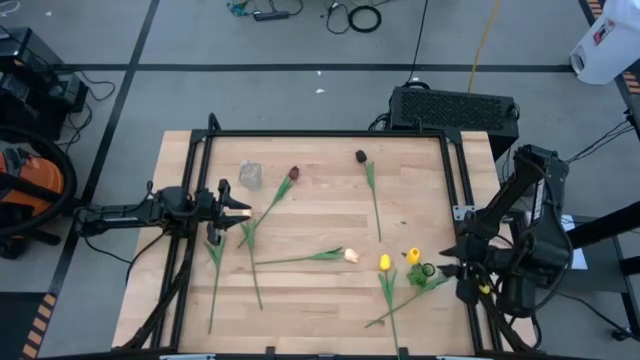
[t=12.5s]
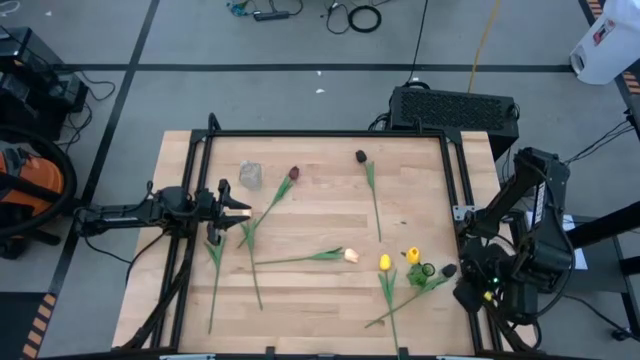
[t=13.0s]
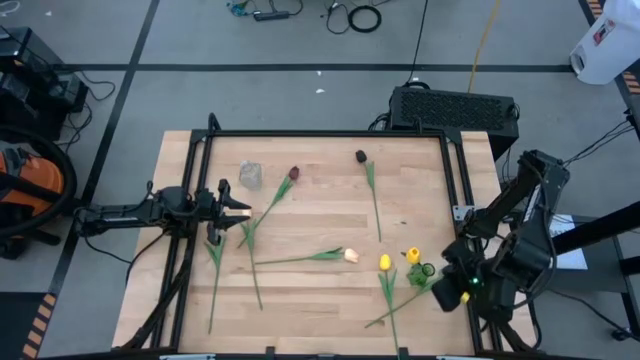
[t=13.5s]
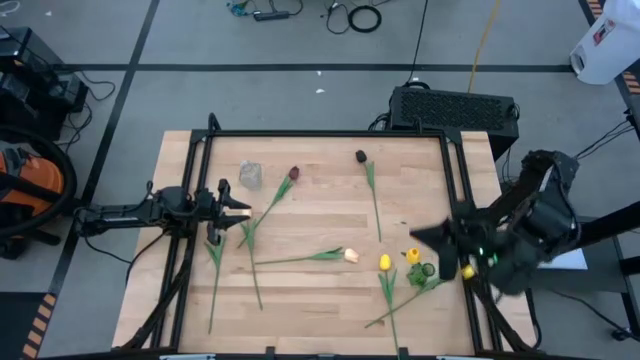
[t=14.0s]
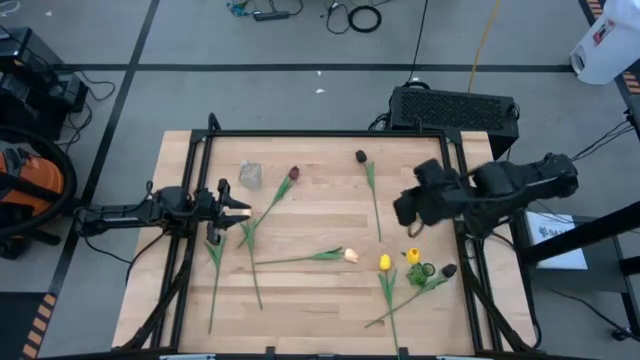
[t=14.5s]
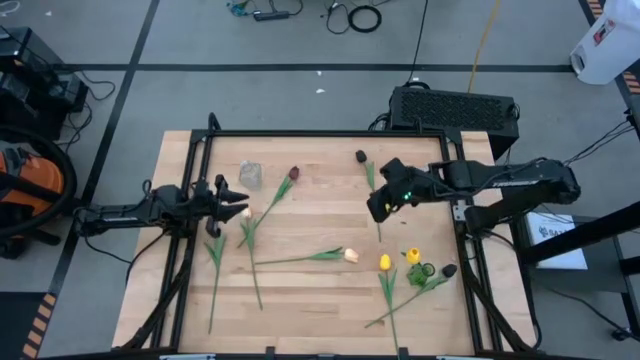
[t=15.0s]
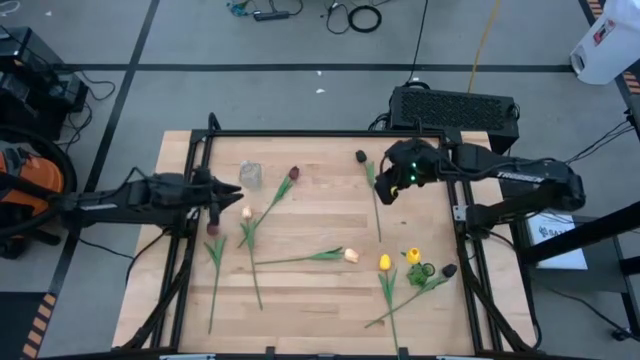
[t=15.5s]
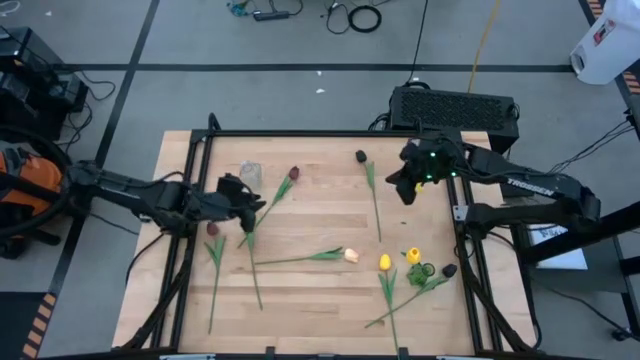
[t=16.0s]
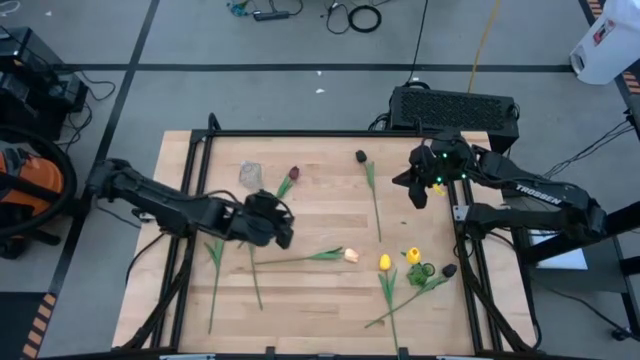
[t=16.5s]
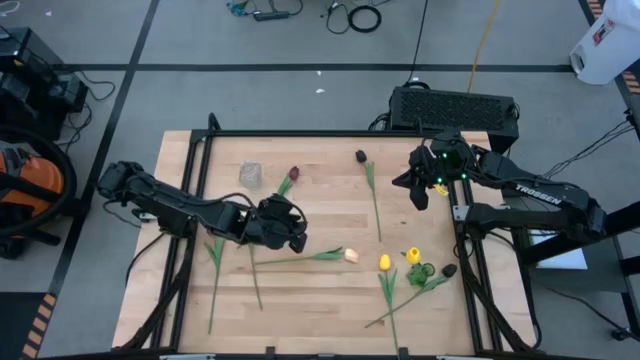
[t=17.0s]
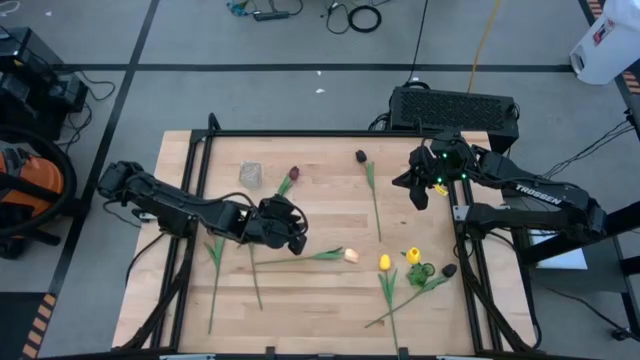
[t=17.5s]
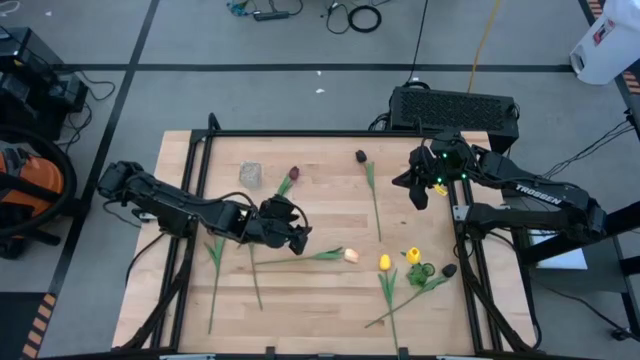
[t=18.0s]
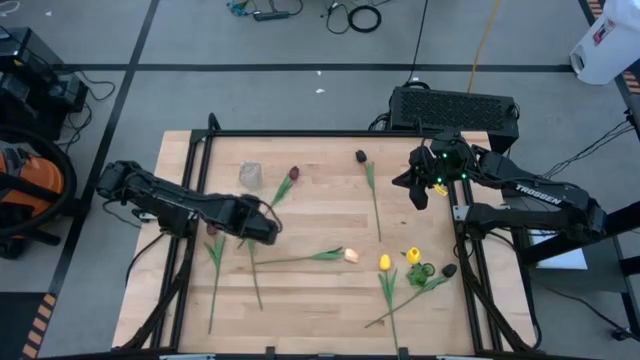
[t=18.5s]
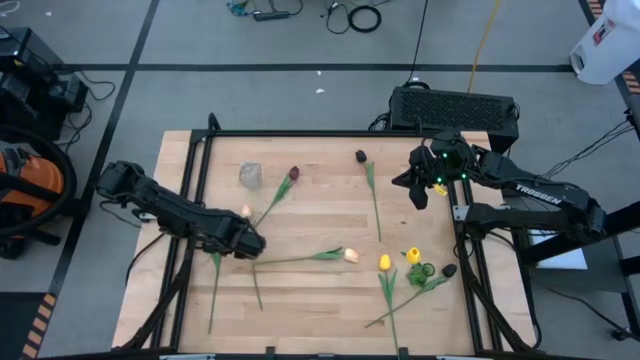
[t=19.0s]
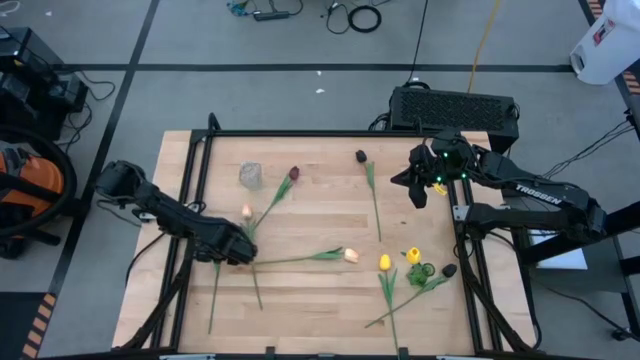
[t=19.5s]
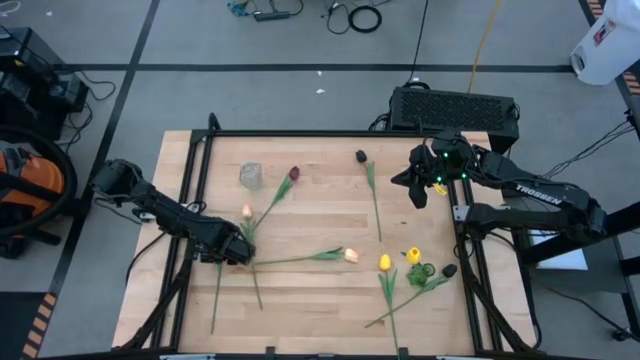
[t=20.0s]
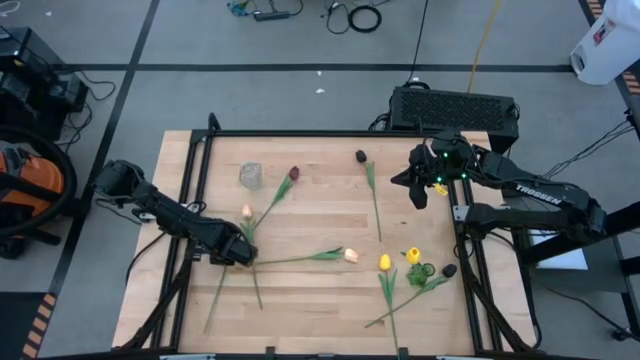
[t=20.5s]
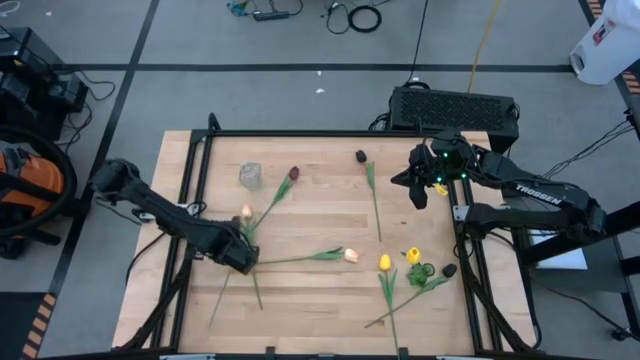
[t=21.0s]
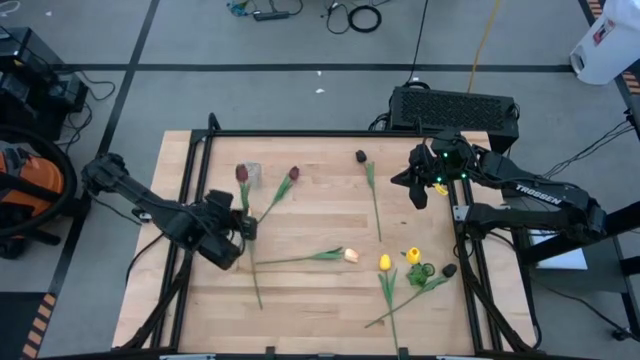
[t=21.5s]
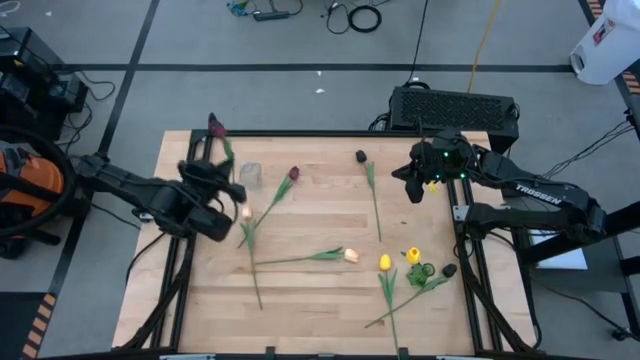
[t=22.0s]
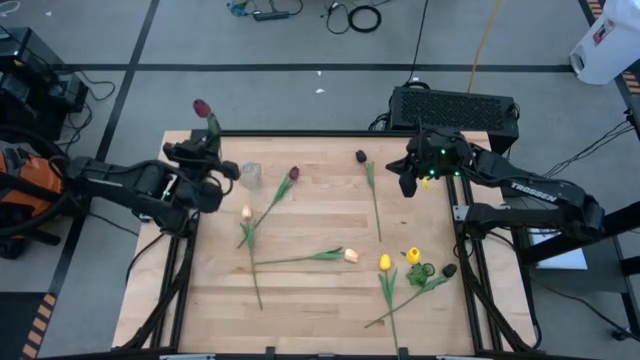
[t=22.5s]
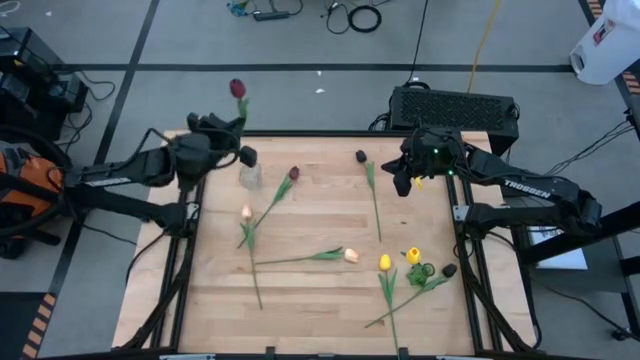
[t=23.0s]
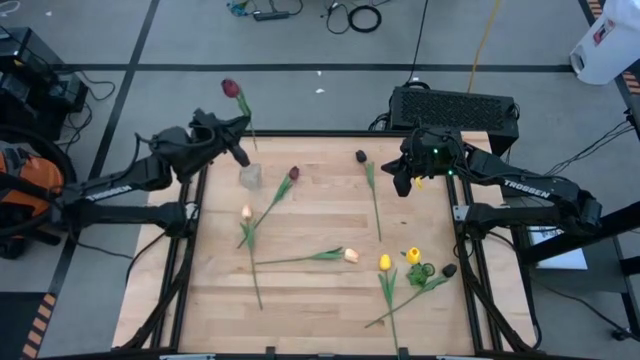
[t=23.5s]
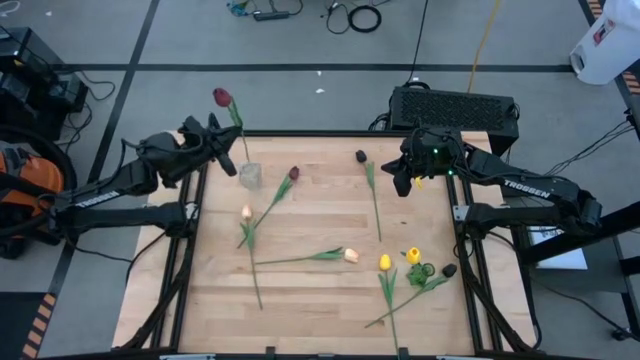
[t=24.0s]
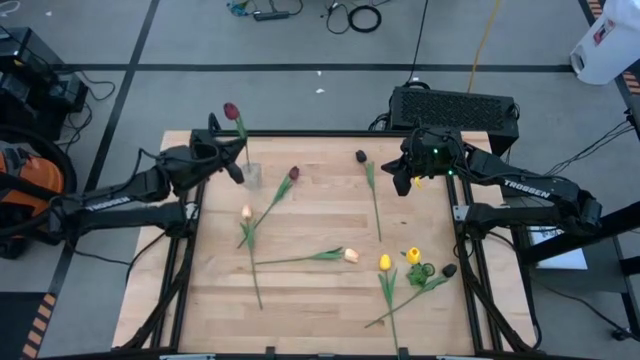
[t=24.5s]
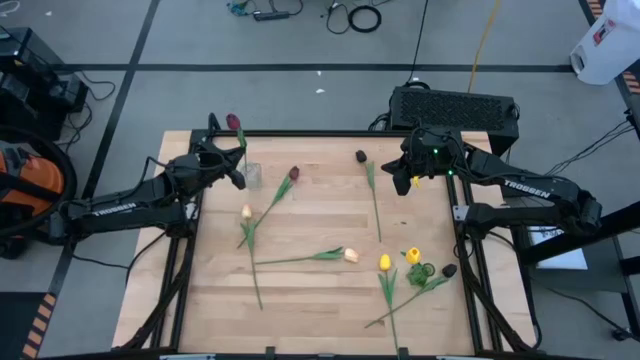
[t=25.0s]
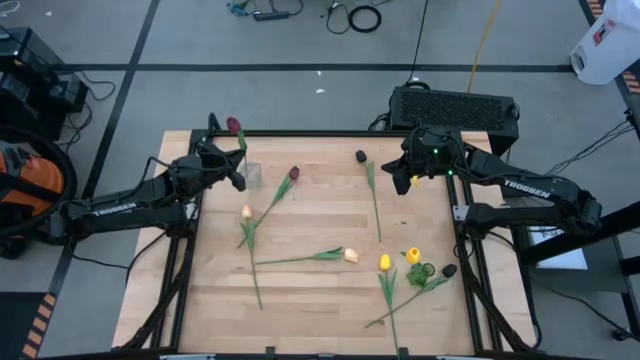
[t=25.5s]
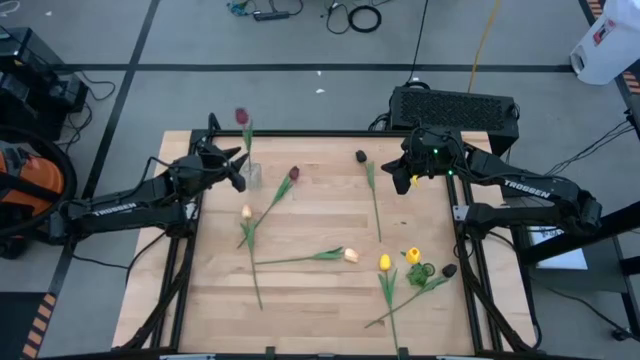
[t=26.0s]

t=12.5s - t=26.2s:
Task: Sort flowers into vase by color
Put the left red flower into the transparent vase

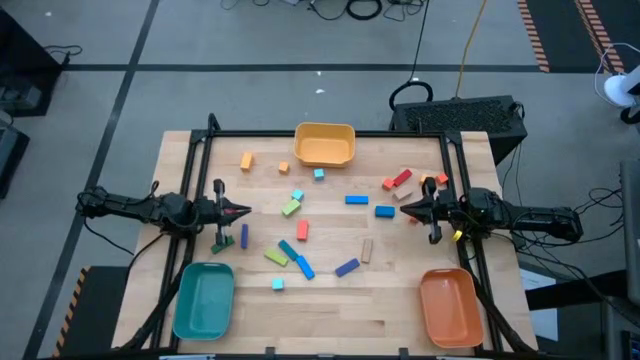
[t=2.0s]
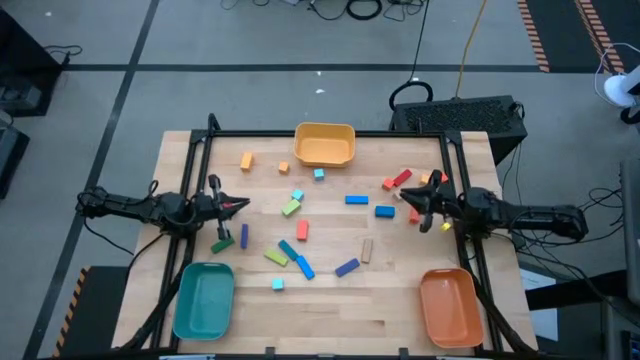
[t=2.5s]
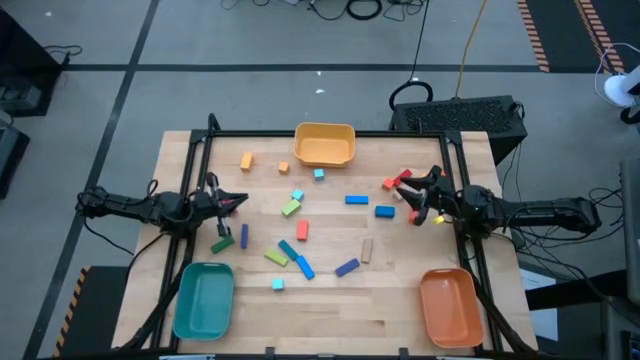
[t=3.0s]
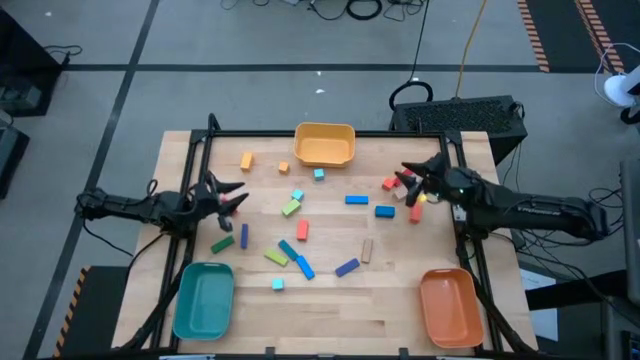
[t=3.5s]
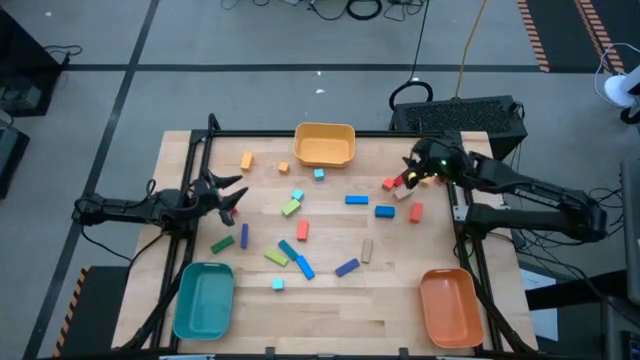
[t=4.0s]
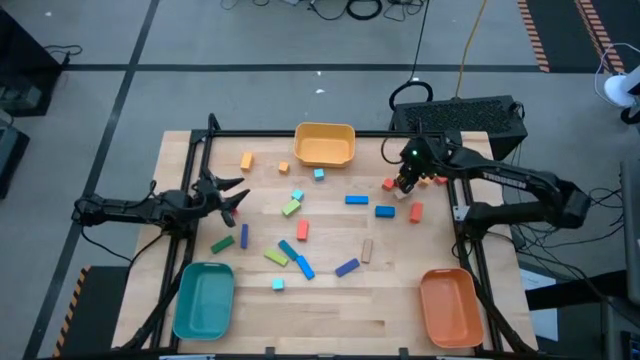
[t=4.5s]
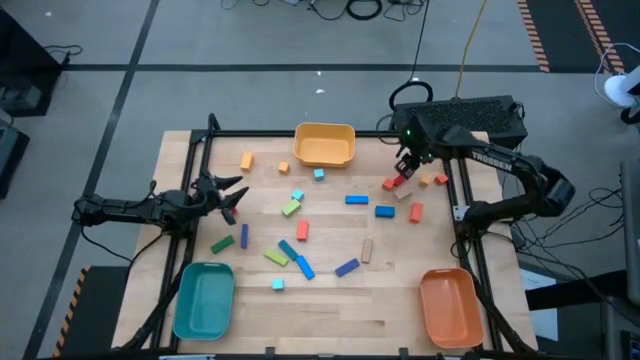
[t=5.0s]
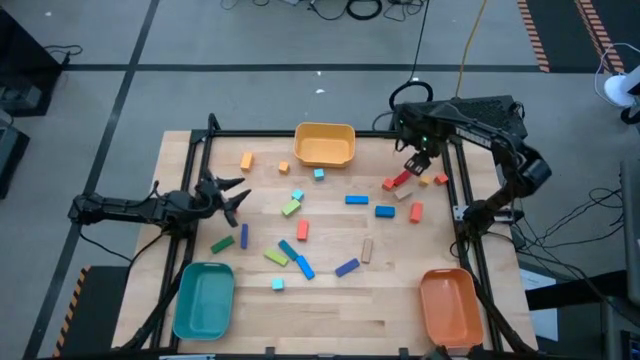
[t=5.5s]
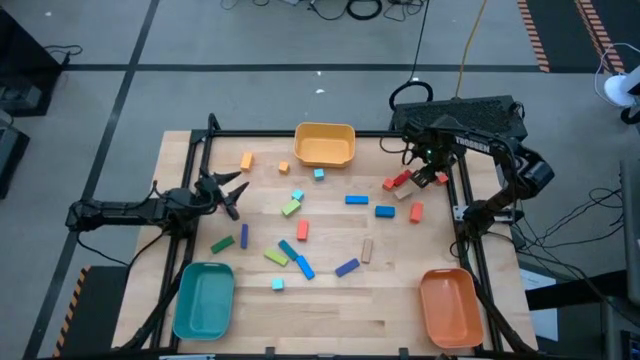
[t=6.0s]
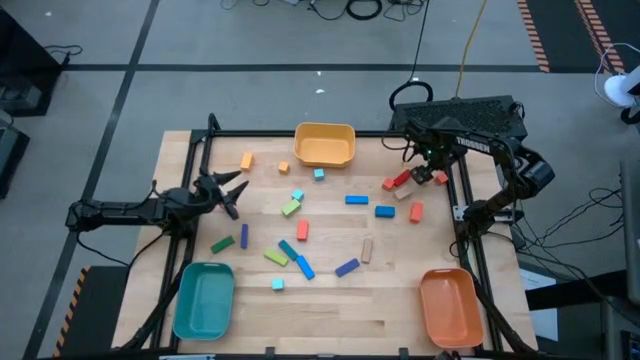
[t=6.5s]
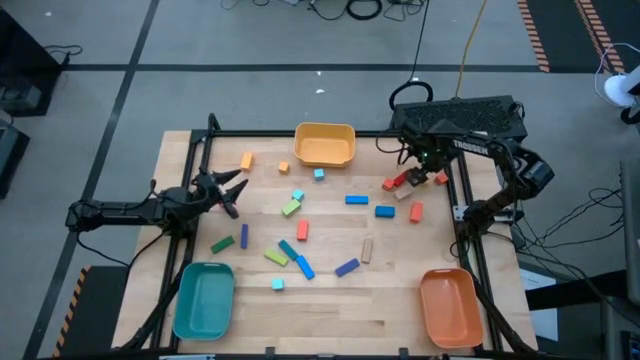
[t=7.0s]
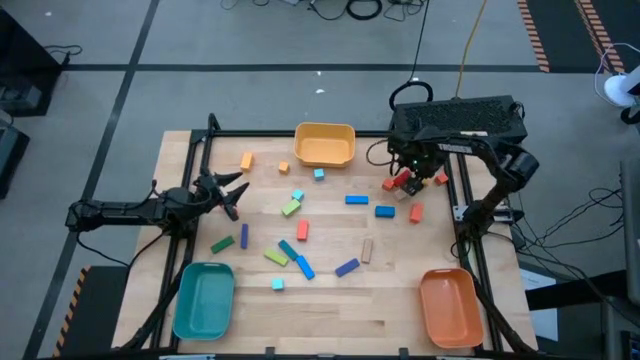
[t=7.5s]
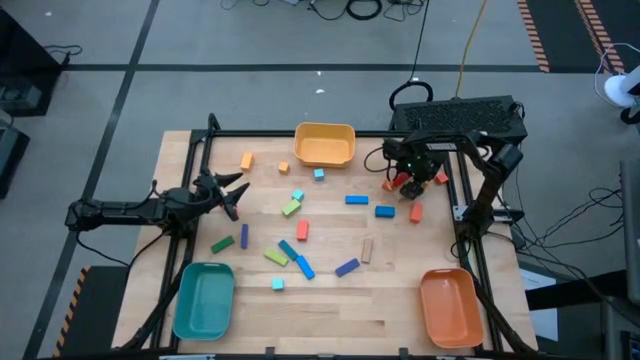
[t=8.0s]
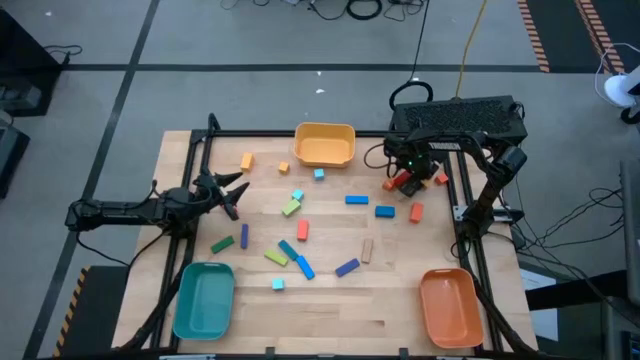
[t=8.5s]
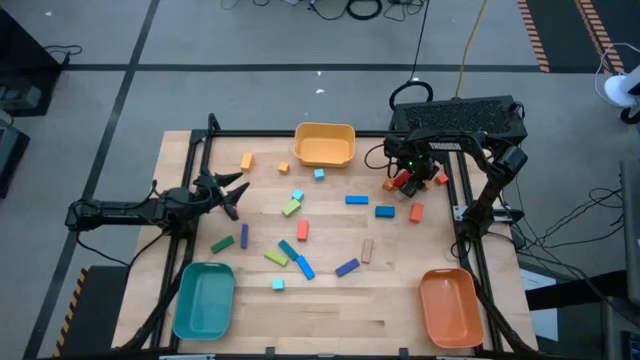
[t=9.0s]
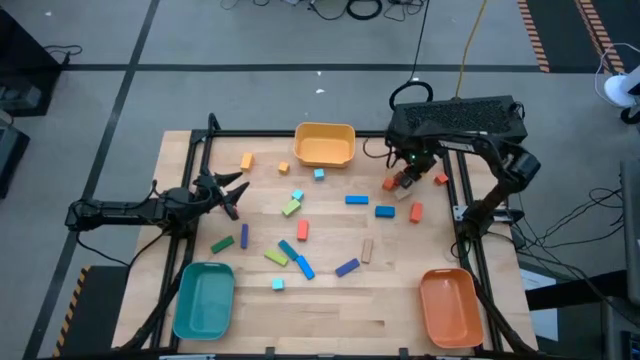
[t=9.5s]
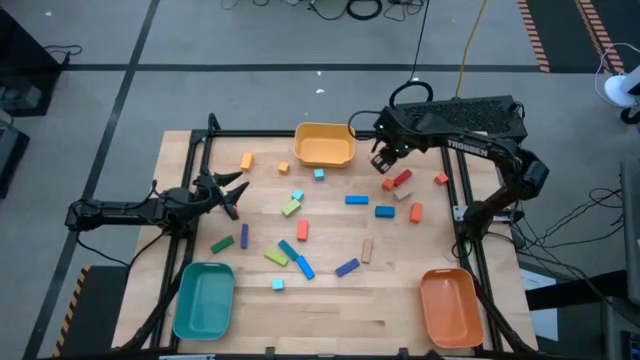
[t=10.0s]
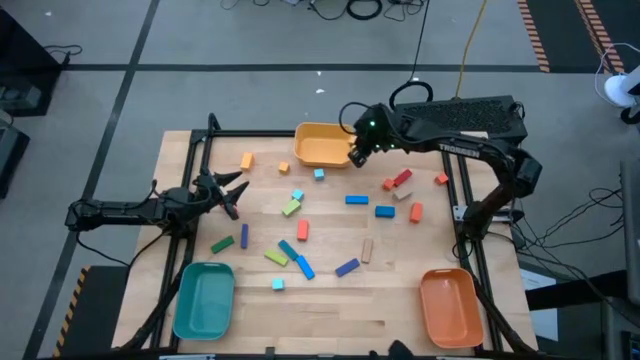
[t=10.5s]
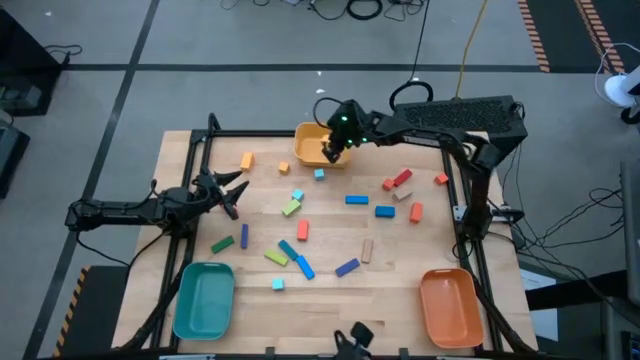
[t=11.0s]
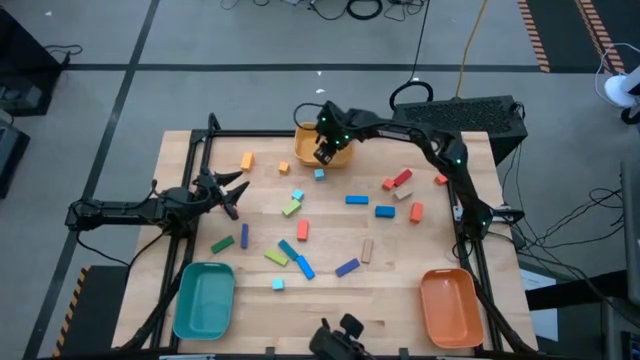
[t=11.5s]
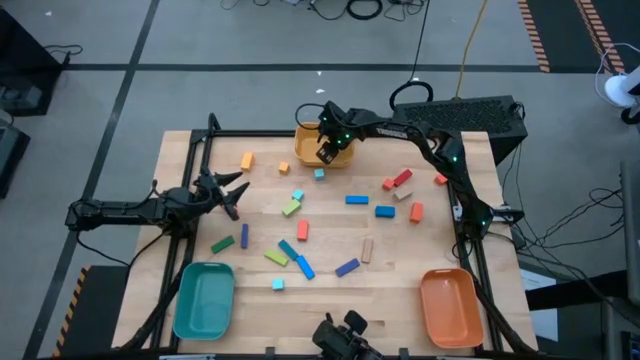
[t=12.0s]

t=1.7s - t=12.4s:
Task: Sort blocks by size
Put the right yellow square block into the yellow bin
